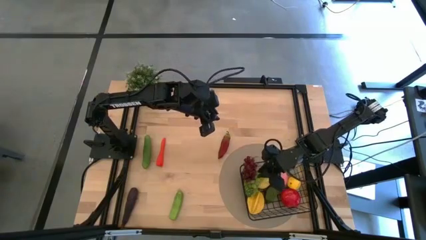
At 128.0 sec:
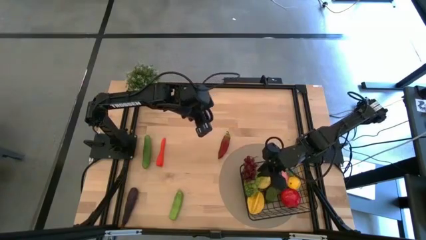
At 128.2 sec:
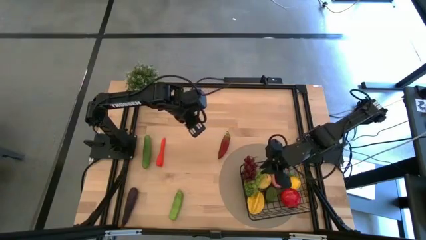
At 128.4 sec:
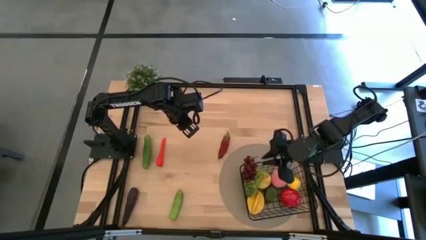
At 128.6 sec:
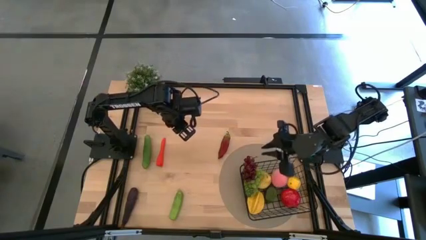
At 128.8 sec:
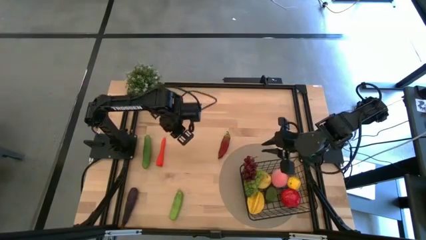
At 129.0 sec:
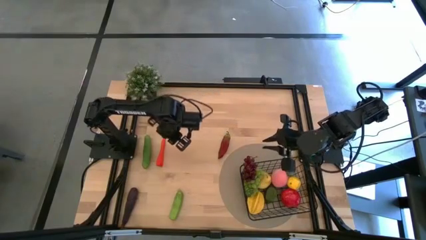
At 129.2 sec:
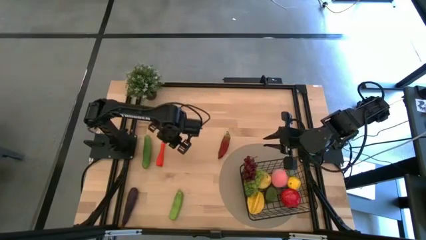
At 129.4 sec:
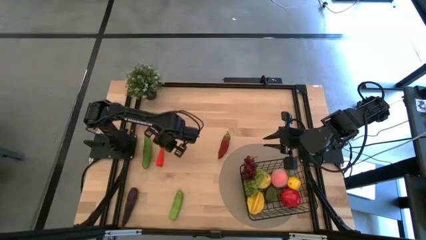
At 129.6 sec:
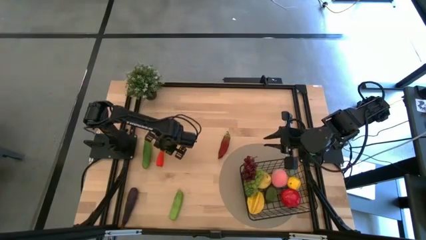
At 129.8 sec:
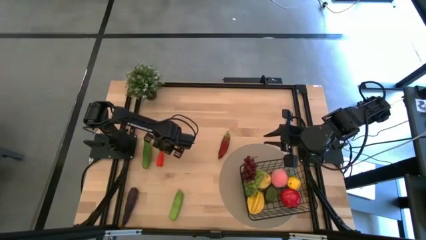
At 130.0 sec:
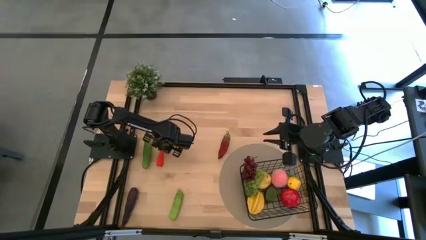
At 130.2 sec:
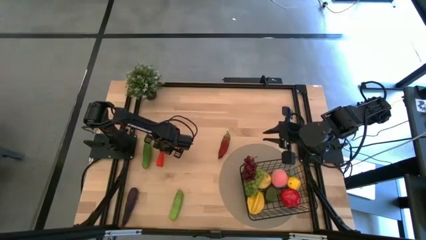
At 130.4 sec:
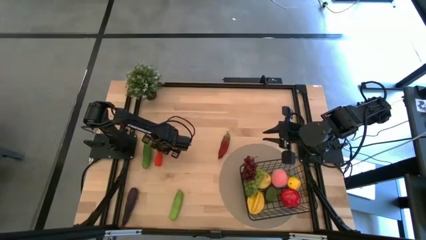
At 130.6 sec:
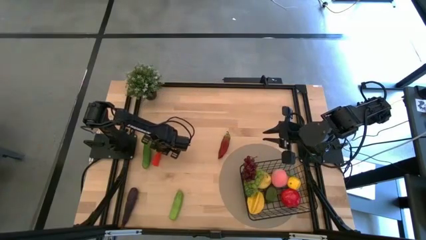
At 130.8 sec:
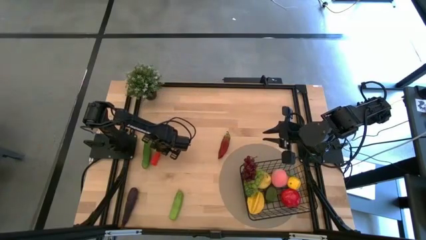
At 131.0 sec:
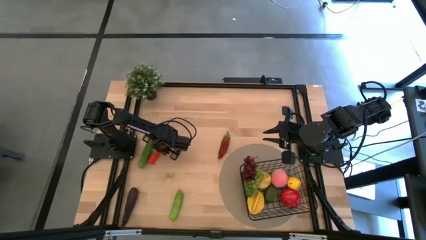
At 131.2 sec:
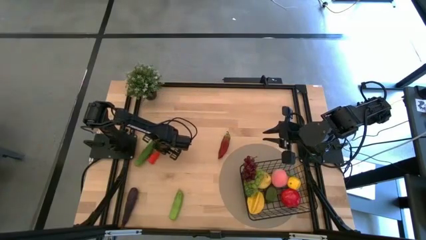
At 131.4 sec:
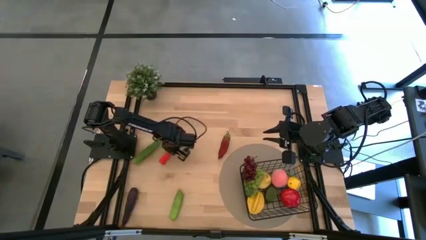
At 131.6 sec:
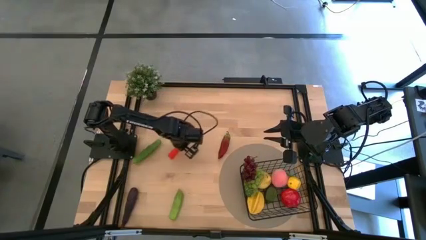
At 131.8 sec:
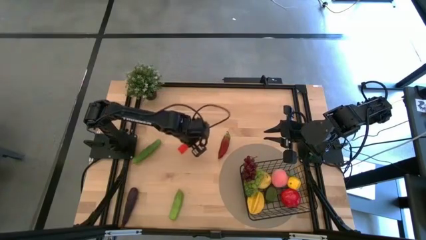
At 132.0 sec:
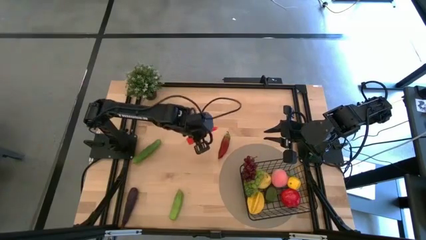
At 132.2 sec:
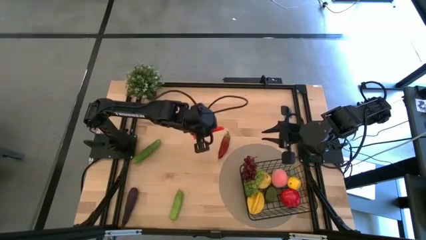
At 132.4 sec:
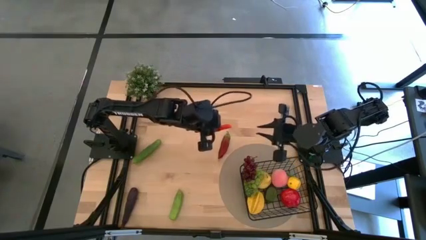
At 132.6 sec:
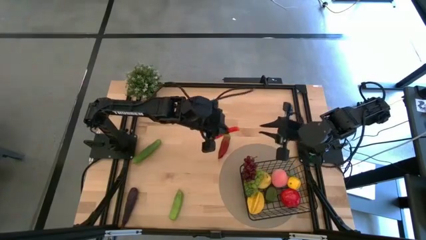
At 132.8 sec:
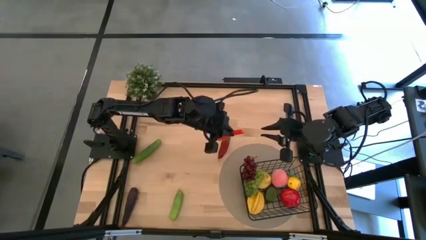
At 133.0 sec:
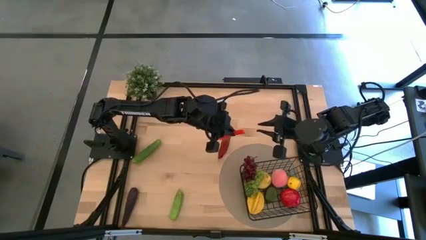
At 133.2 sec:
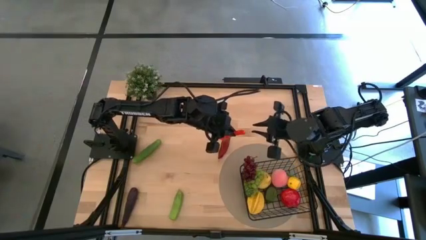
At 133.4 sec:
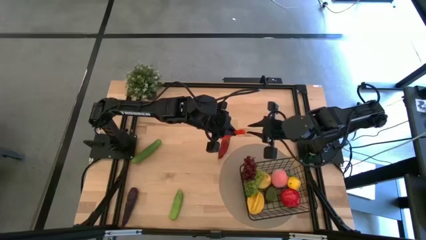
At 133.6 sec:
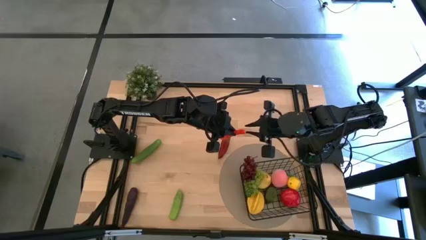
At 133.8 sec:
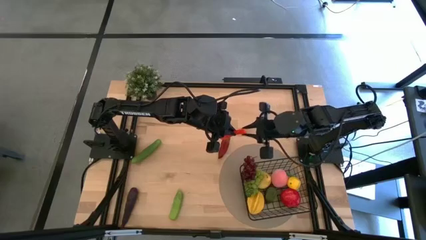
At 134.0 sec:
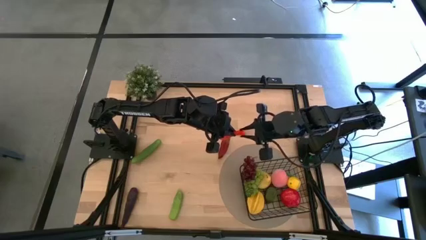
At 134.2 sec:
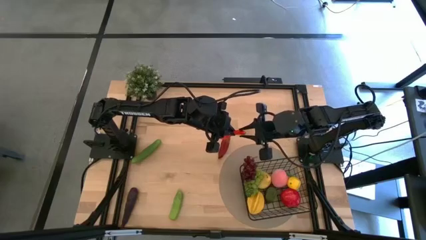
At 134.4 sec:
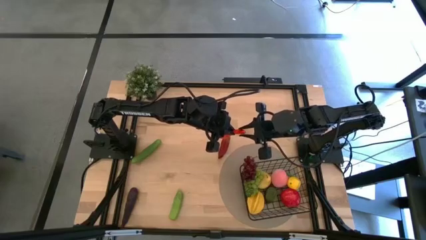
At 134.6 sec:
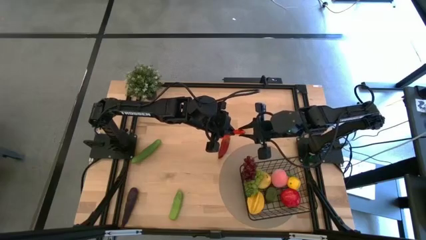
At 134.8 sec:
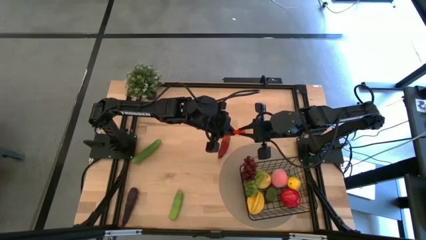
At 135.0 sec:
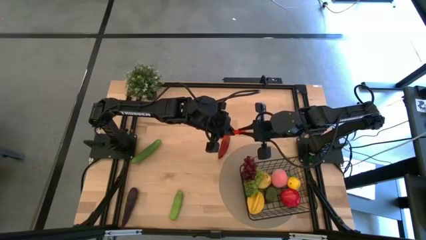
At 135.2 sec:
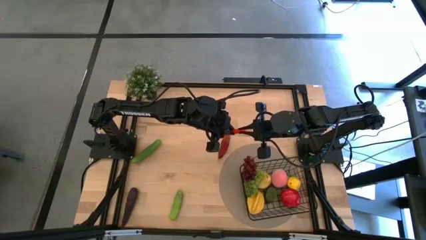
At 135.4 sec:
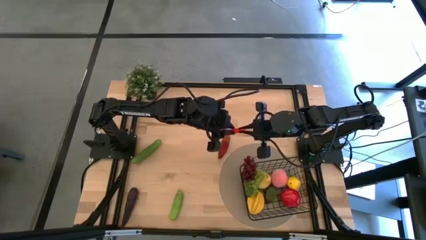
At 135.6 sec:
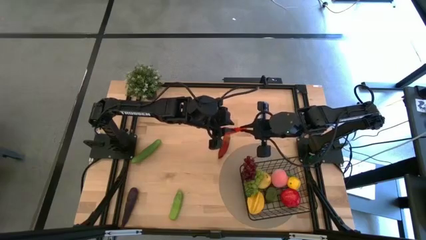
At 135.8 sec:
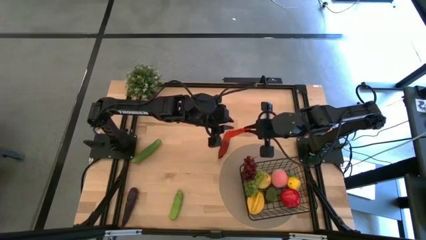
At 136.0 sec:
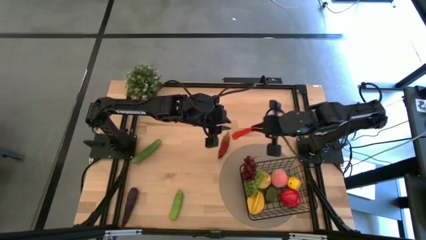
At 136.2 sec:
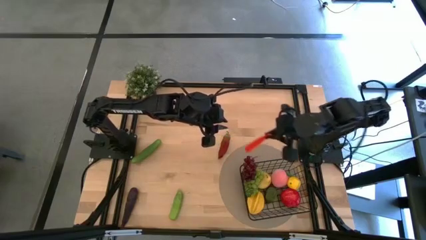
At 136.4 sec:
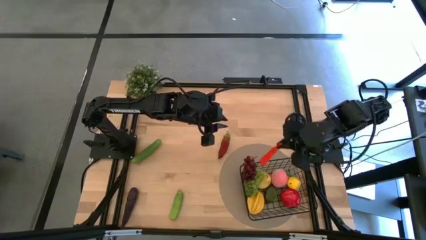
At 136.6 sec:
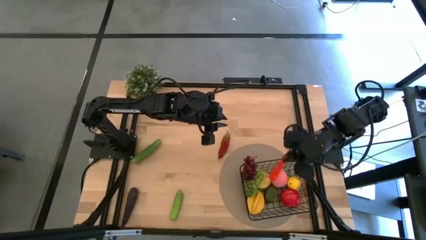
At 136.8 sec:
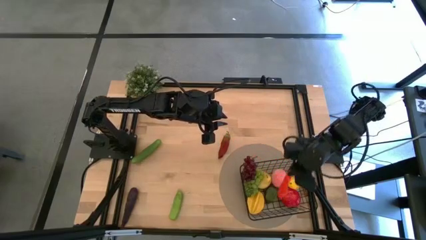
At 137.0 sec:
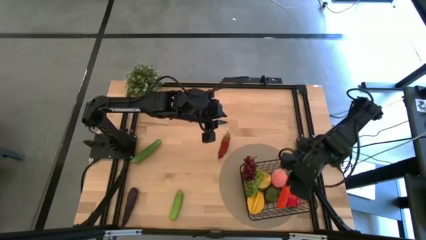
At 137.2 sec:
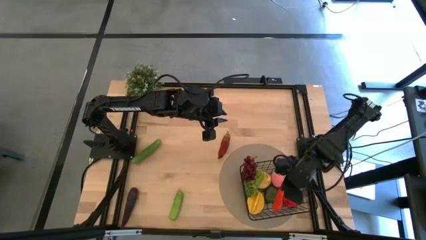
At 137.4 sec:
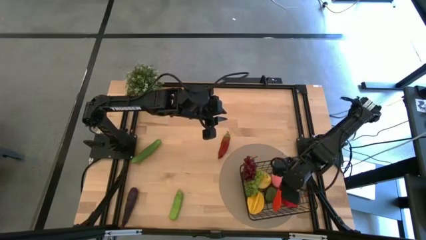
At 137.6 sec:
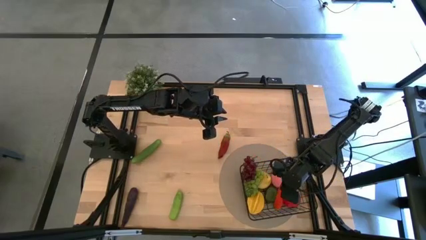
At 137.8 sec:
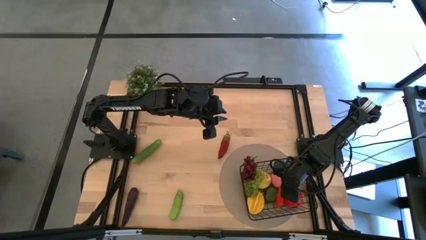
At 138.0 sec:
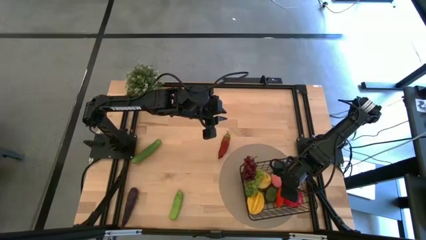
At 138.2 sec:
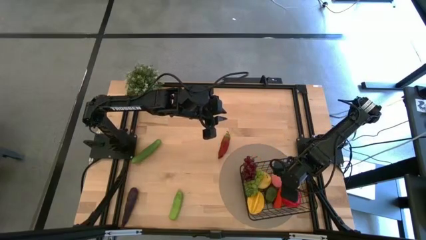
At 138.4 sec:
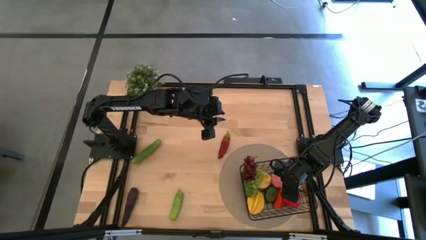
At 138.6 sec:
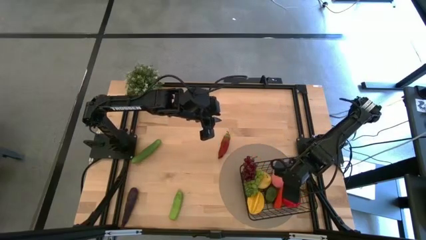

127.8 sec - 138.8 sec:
Task: Build produce basket
Put the carrot into the wire basket

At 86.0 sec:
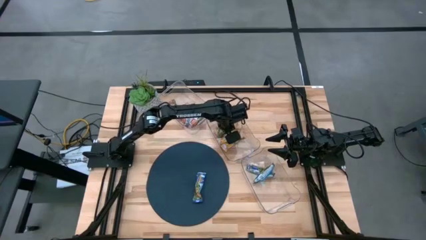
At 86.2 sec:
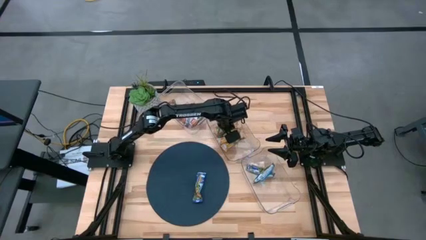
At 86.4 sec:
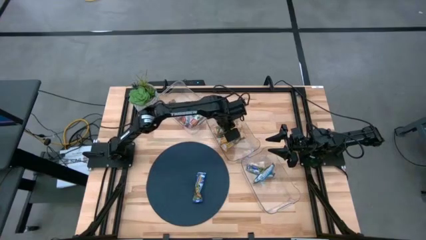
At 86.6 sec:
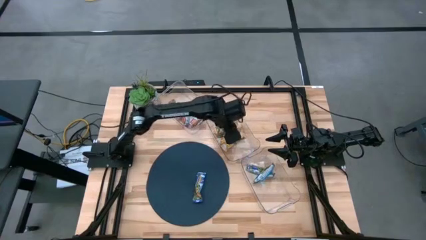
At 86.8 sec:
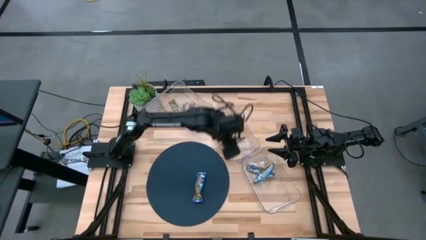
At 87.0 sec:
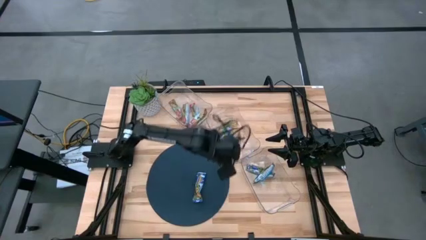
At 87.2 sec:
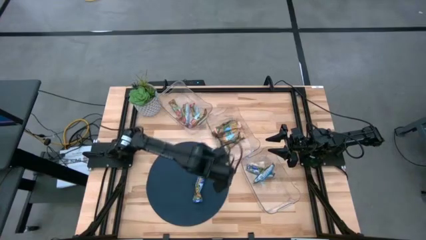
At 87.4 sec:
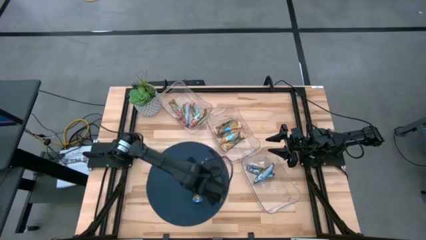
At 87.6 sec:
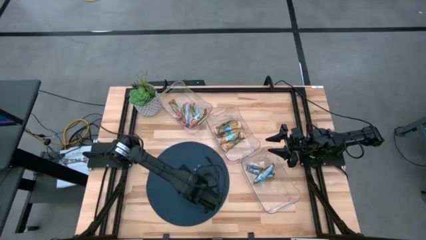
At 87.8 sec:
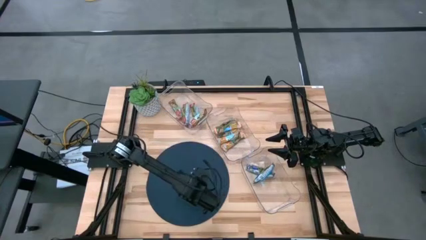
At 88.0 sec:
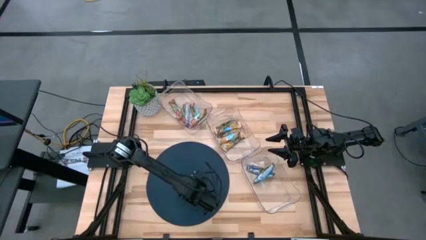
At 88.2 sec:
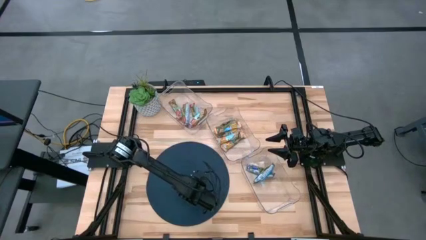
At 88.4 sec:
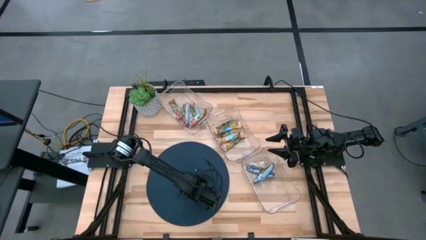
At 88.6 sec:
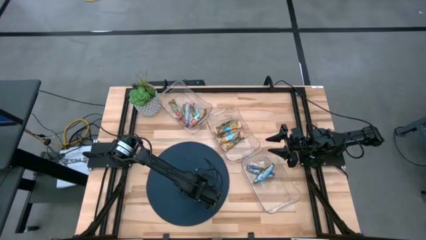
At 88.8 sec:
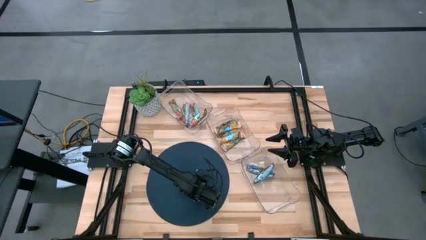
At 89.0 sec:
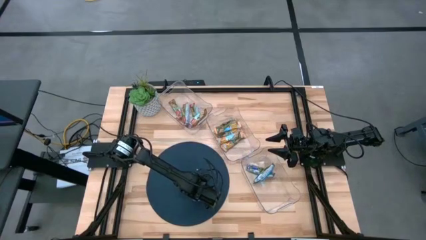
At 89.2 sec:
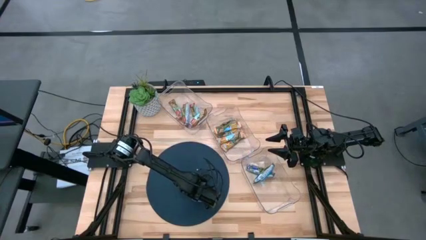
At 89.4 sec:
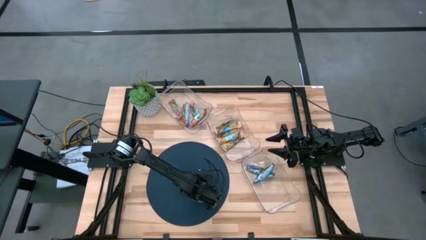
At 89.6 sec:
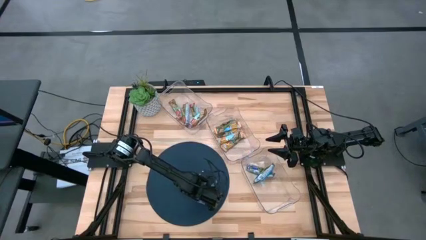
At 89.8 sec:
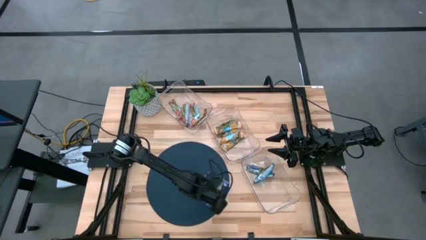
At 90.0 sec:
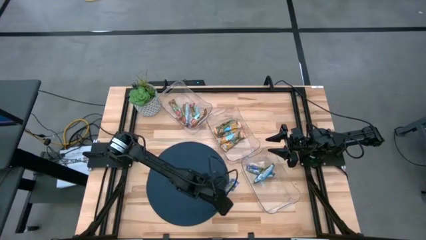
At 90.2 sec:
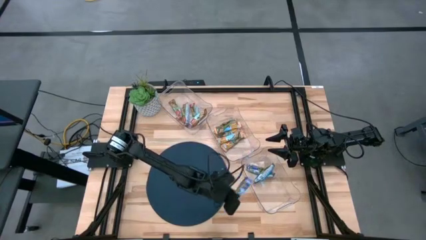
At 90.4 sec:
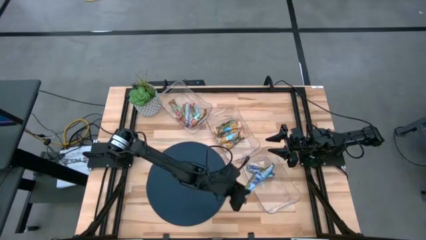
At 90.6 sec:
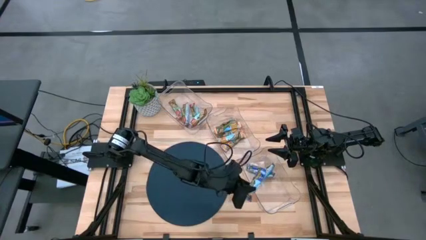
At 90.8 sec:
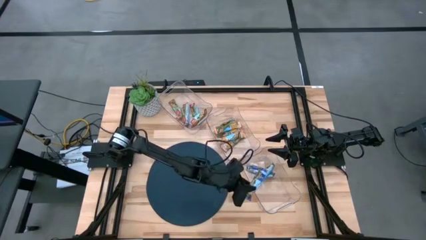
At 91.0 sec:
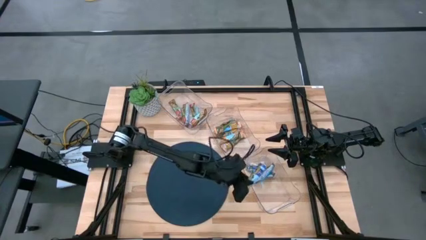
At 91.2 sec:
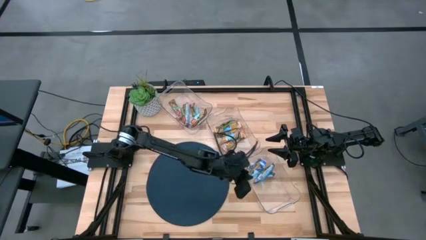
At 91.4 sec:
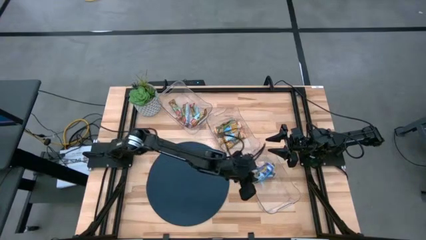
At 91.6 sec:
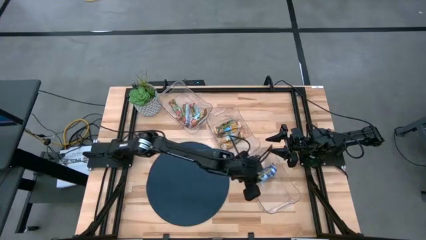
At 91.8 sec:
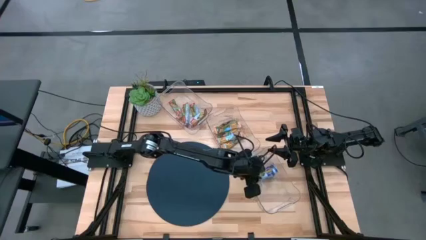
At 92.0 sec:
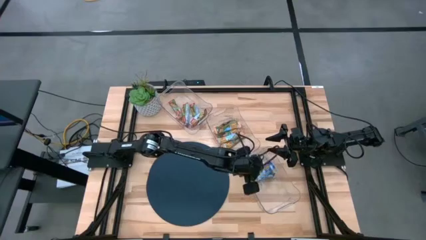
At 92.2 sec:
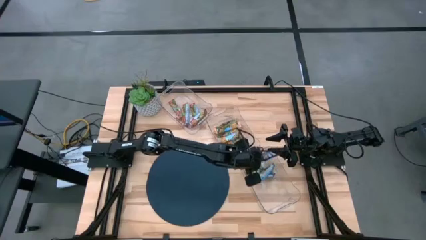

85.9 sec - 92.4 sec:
Task: Pick and place Granola Bars by type
Put the blue granola bar into the bottom transparent bin
